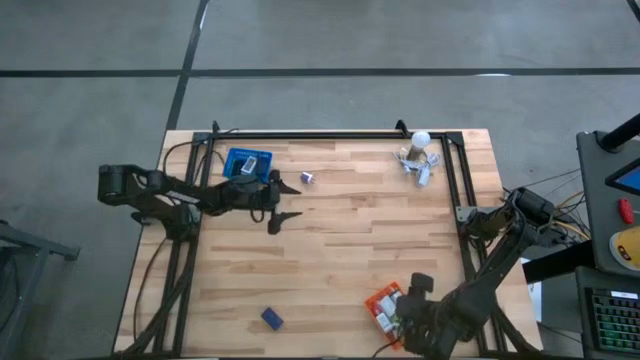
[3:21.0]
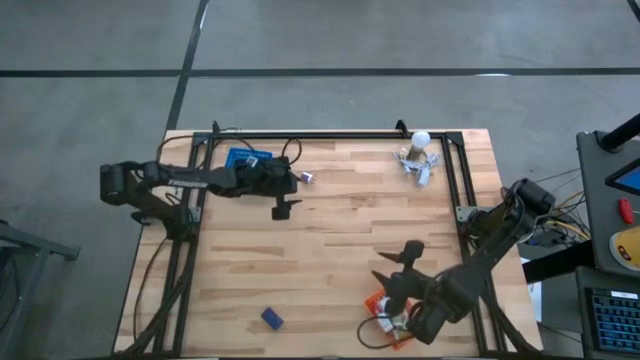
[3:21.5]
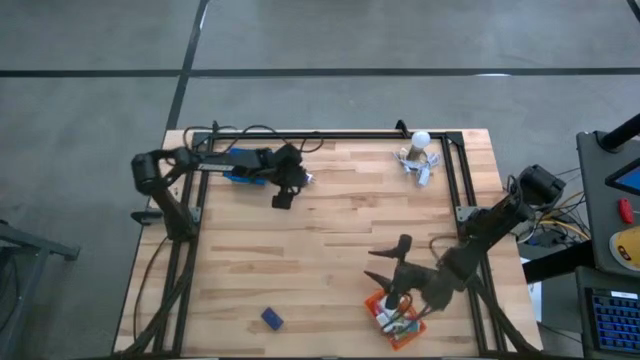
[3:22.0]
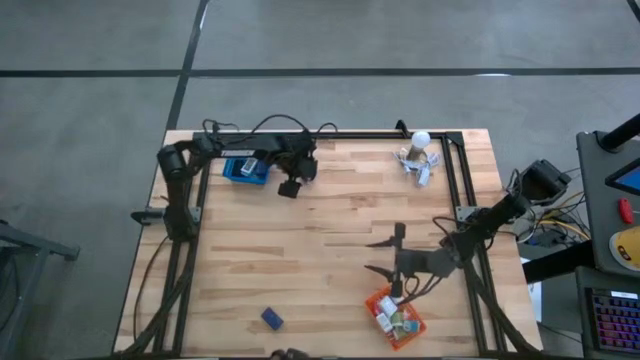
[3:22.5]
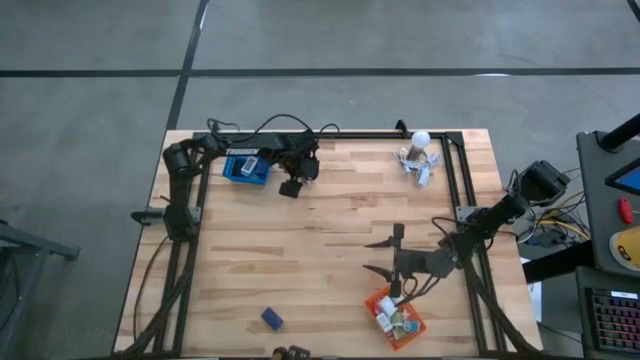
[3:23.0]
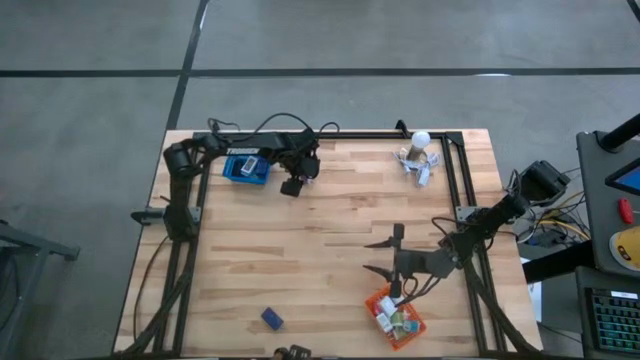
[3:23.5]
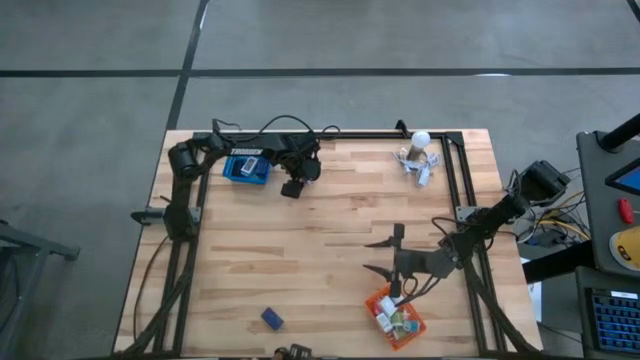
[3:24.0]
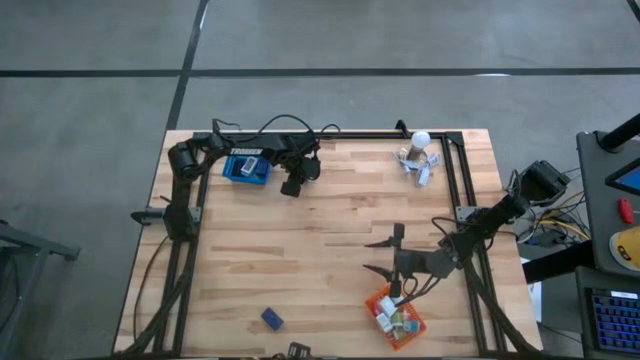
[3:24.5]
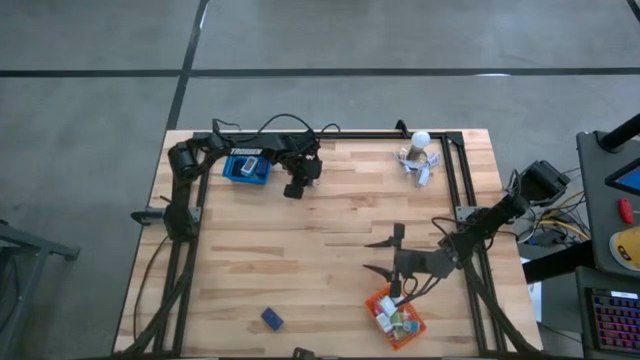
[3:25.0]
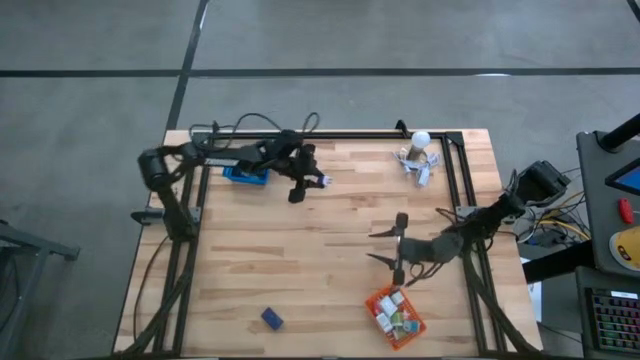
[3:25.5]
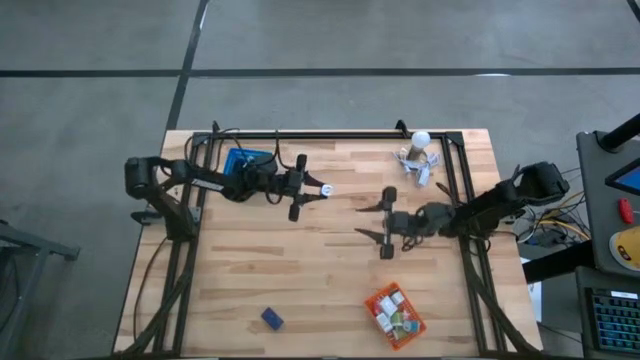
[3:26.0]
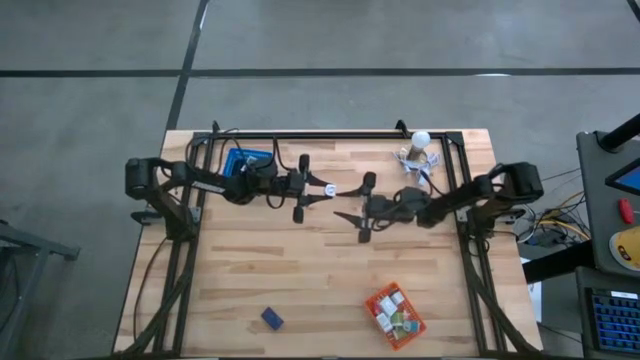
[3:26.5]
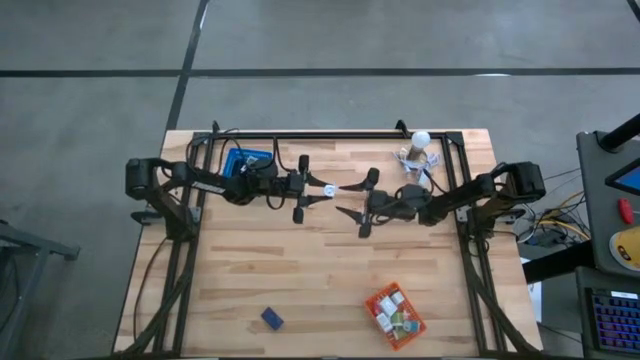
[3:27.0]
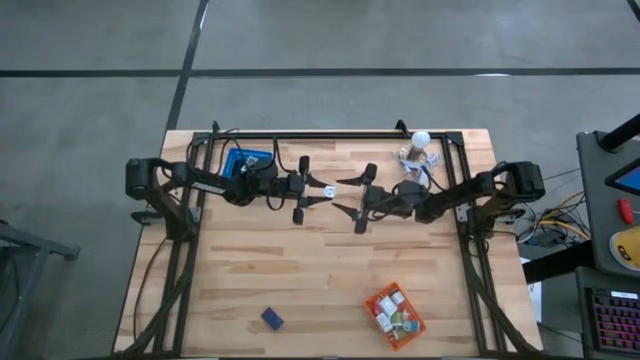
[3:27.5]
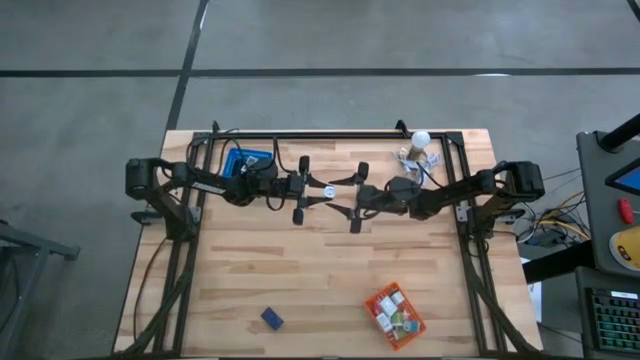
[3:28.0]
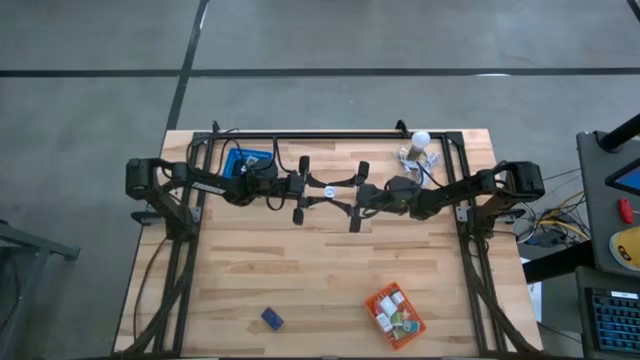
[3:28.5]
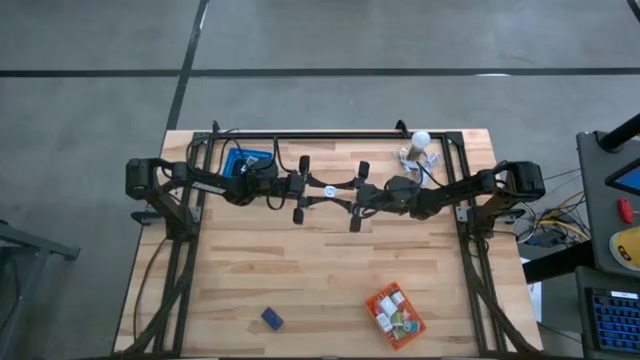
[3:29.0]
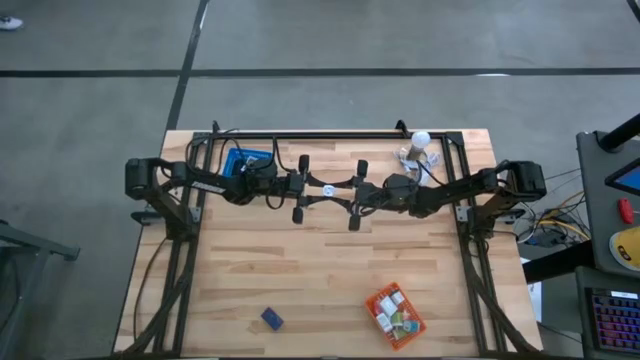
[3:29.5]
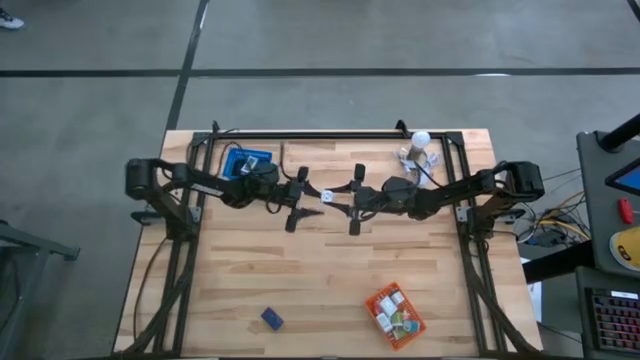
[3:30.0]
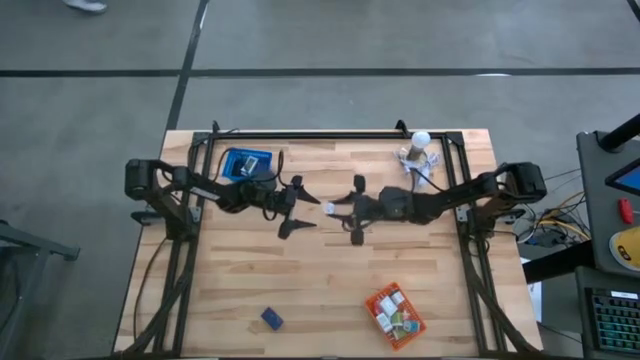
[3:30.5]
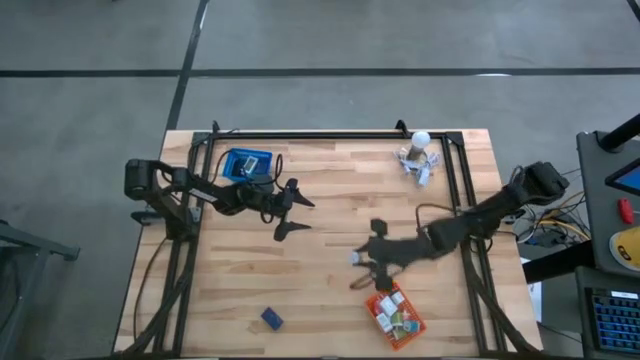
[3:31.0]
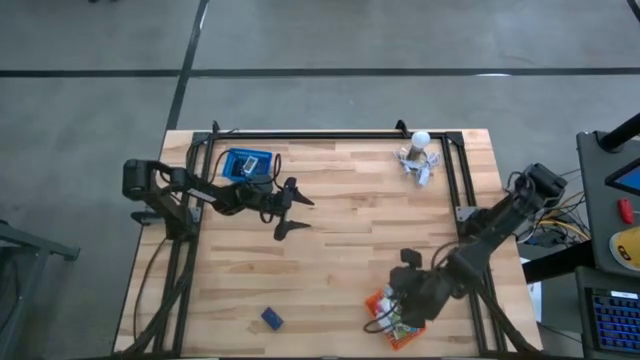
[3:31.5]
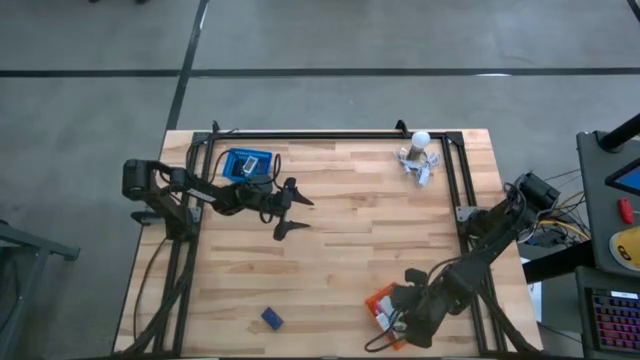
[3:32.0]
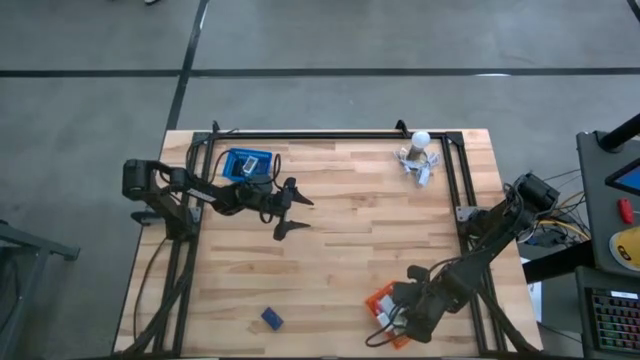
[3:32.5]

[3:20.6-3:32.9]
Task: Pick & Place Office items
Put the violet charger adapter into the orange bin

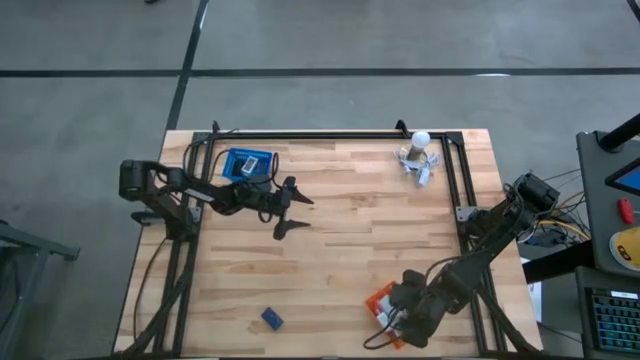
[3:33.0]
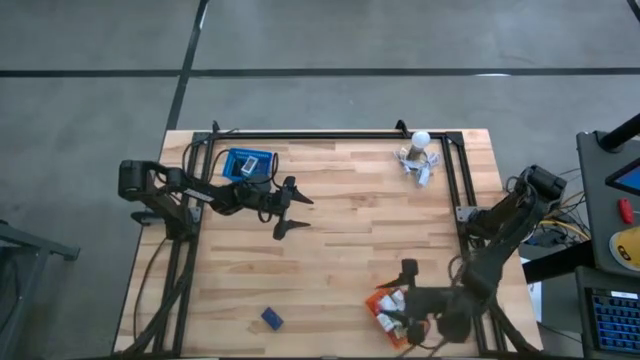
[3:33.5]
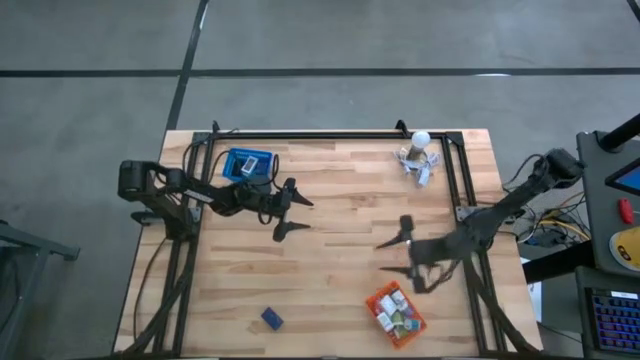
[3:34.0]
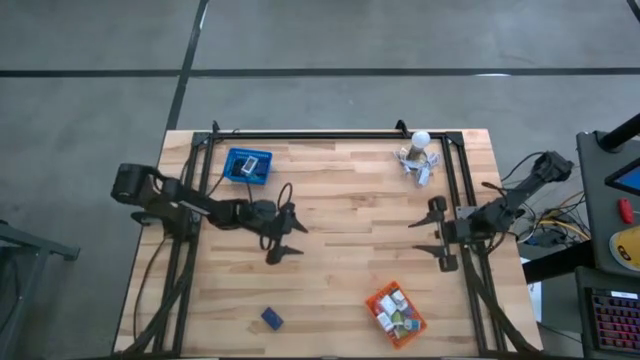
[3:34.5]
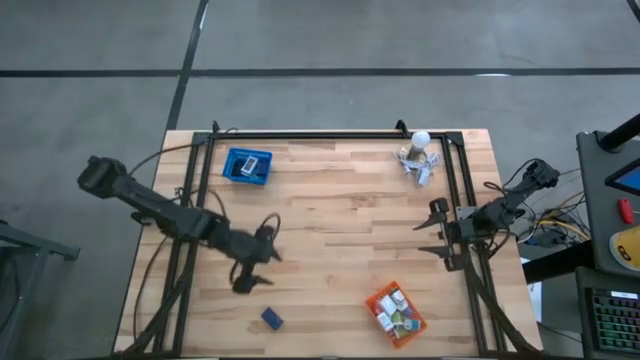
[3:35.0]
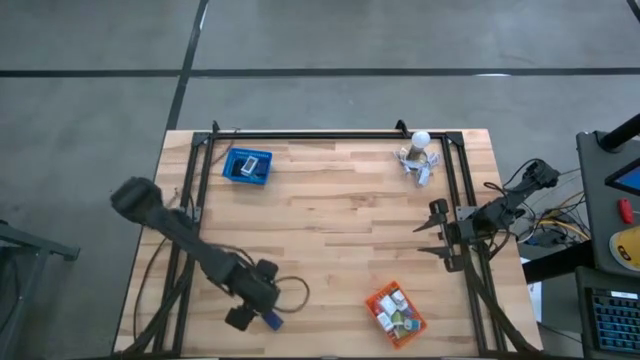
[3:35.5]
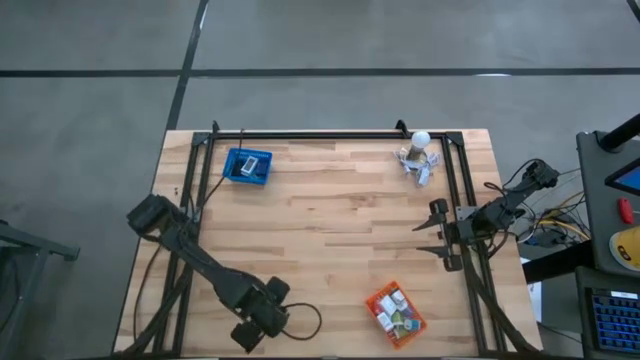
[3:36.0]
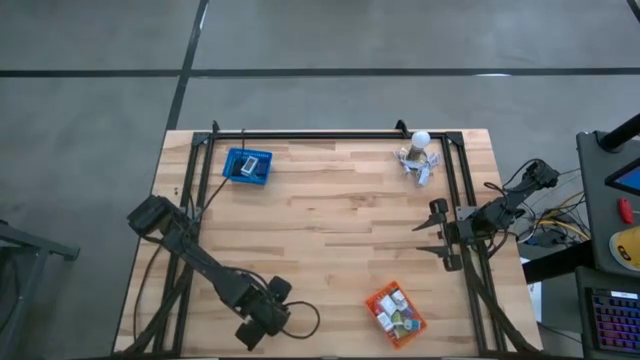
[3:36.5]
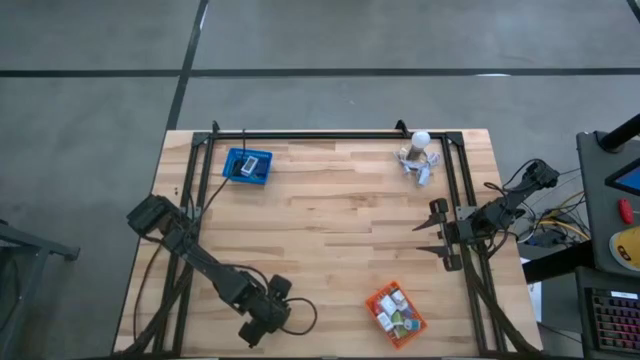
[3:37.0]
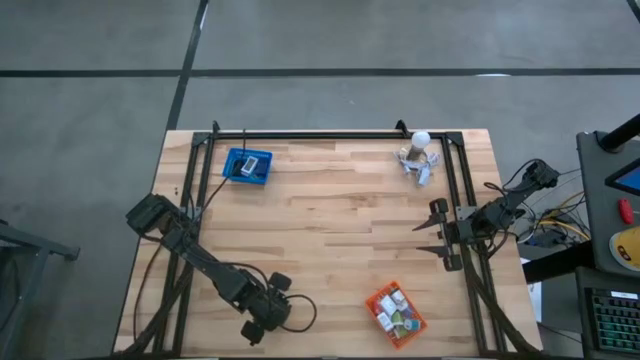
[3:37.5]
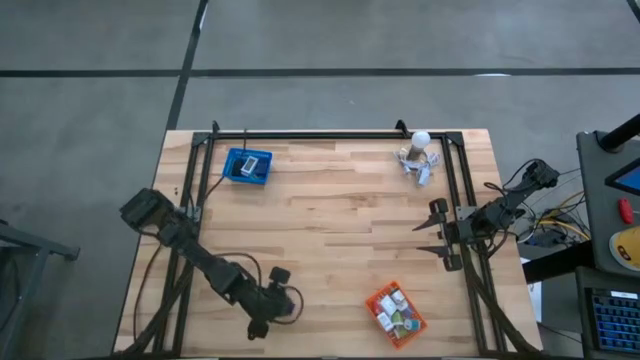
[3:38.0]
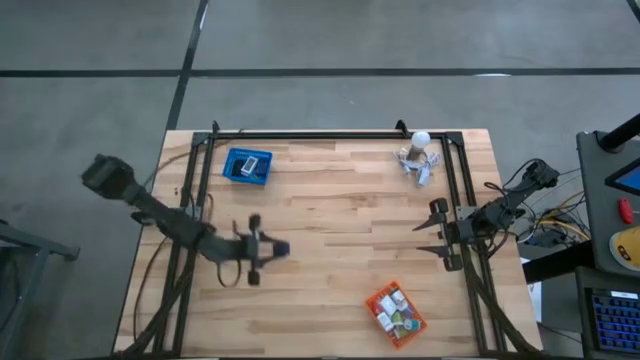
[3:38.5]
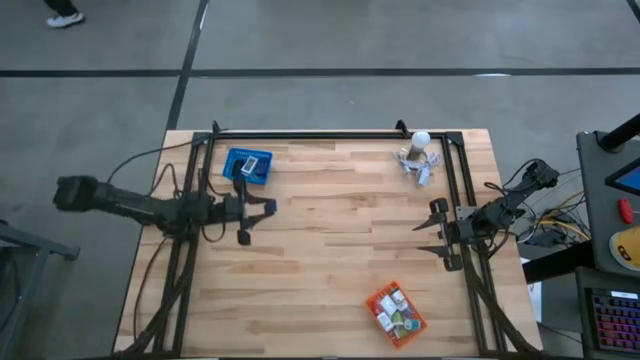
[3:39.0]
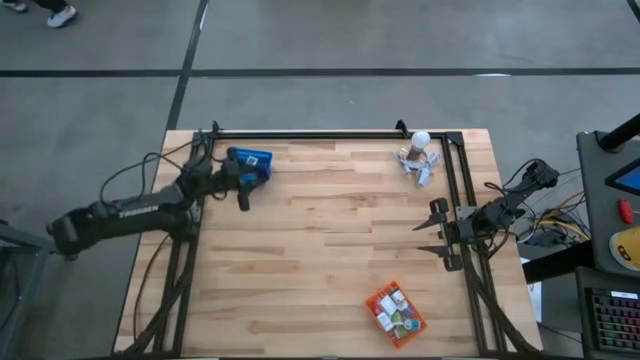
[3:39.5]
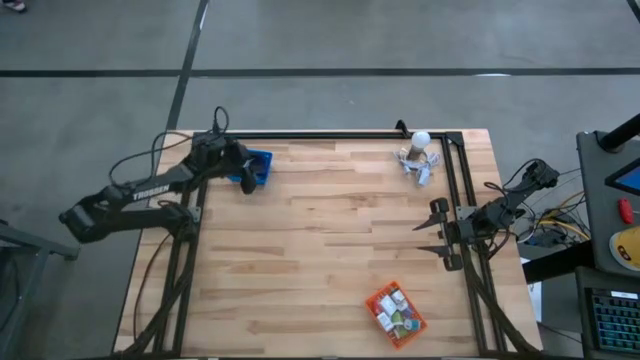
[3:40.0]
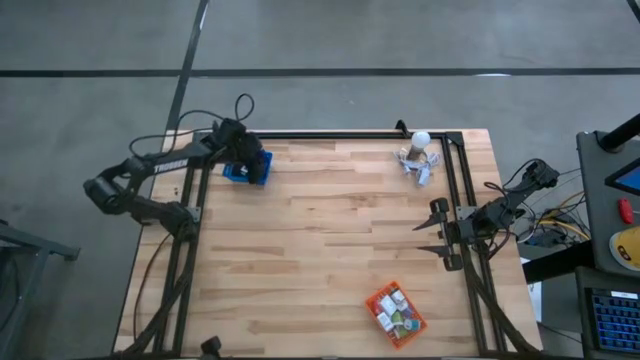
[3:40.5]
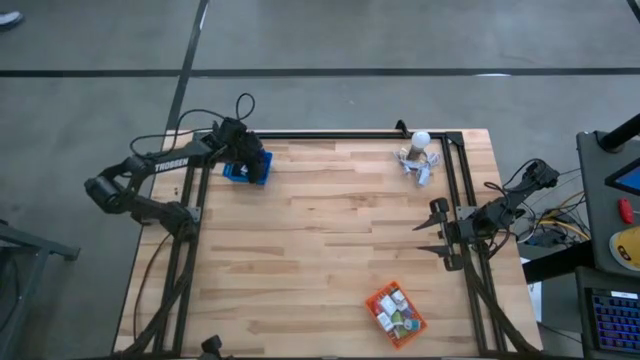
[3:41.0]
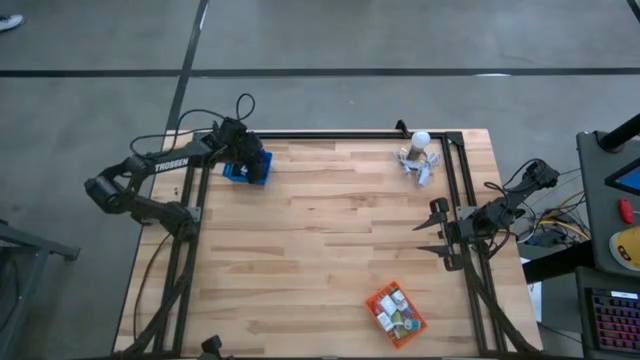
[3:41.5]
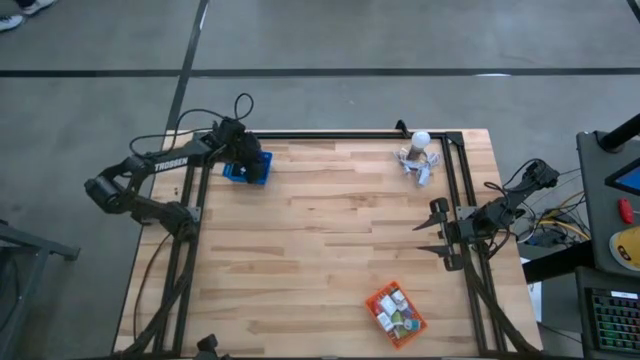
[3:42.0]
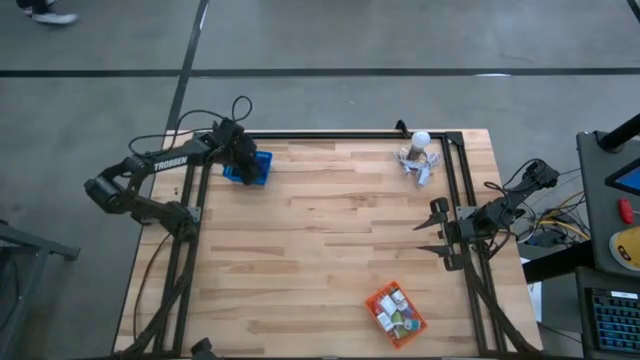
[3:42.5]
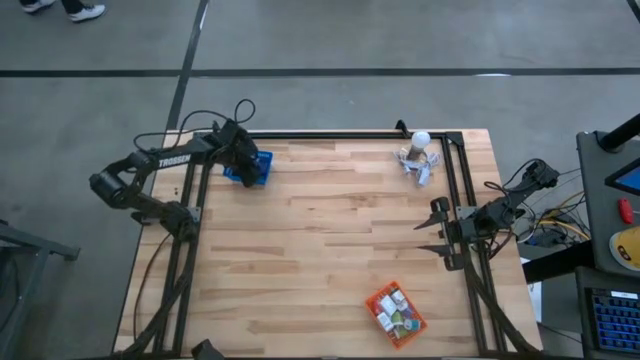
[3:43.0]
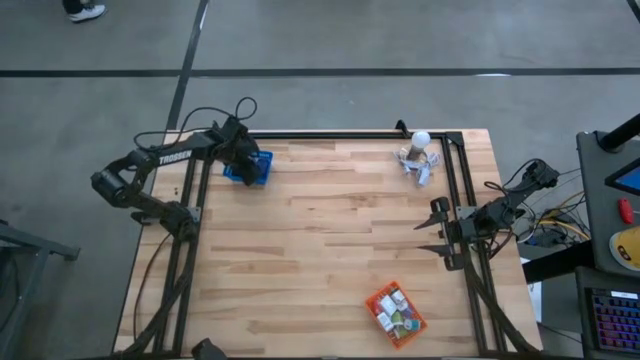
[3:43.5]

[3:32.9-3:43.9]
Put the dark blue digital clock into the blue bin
